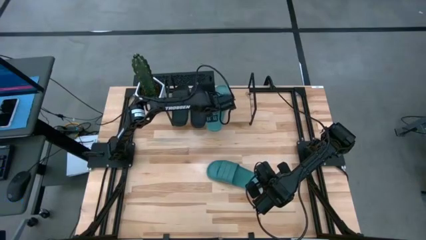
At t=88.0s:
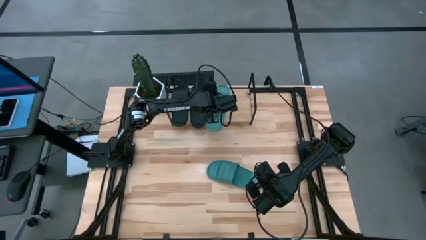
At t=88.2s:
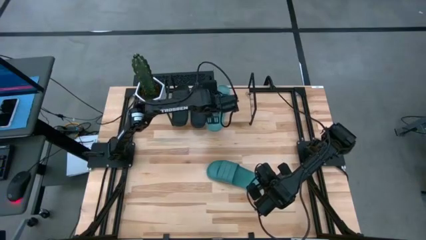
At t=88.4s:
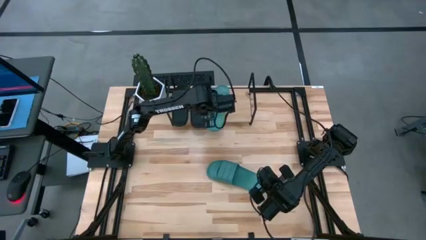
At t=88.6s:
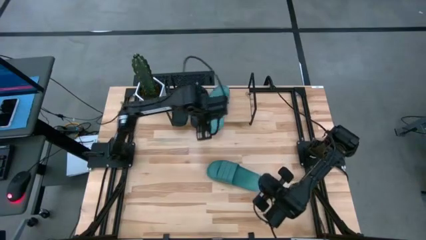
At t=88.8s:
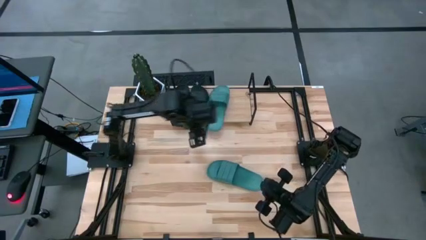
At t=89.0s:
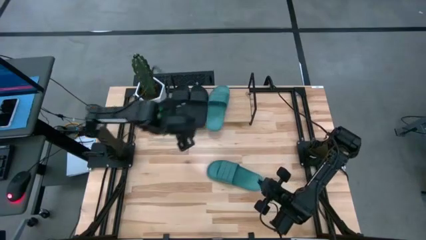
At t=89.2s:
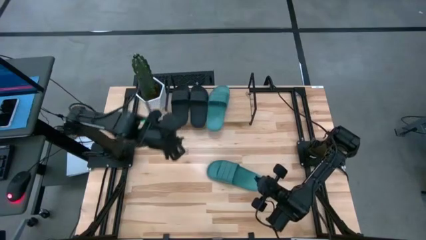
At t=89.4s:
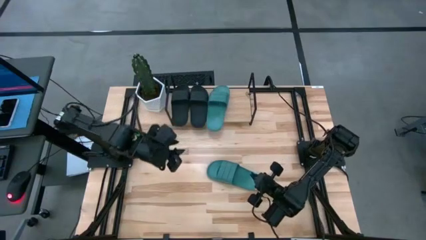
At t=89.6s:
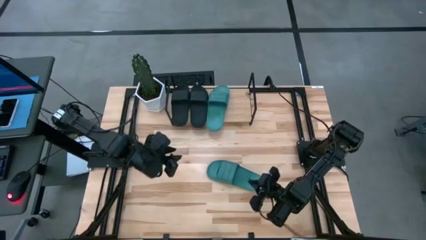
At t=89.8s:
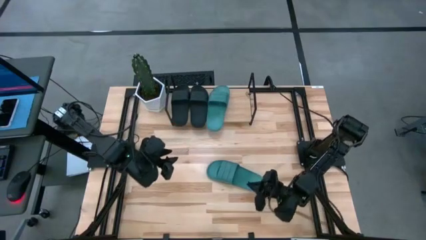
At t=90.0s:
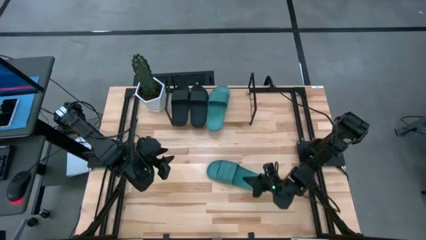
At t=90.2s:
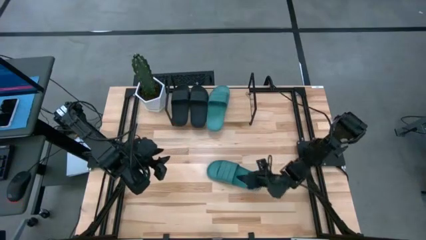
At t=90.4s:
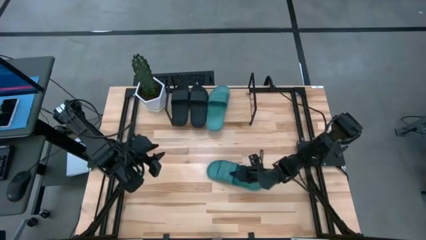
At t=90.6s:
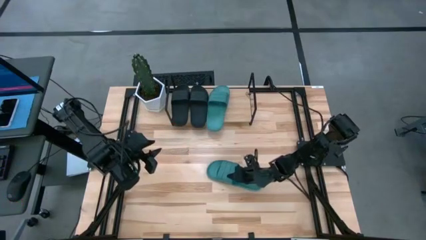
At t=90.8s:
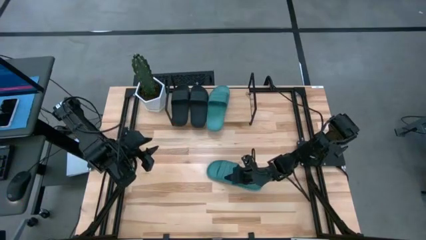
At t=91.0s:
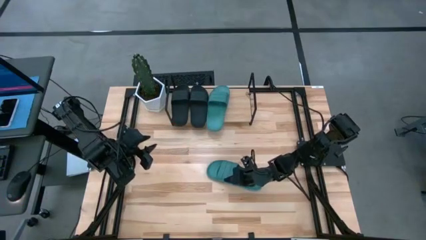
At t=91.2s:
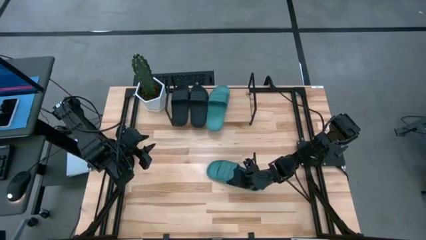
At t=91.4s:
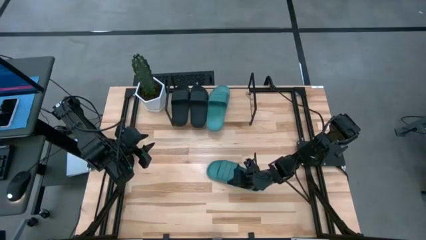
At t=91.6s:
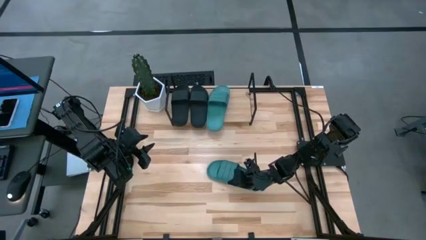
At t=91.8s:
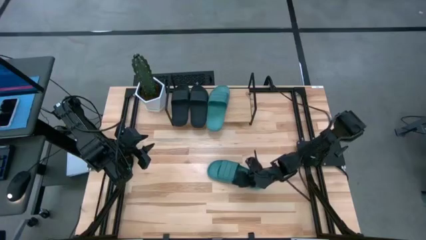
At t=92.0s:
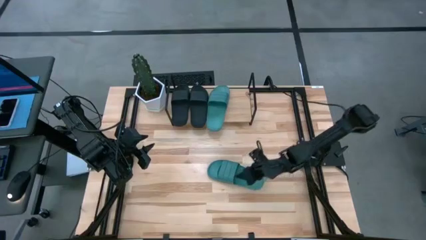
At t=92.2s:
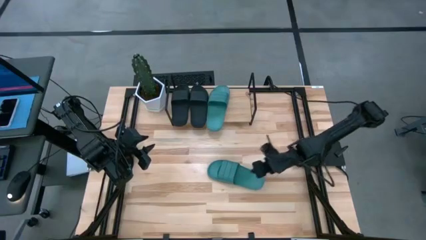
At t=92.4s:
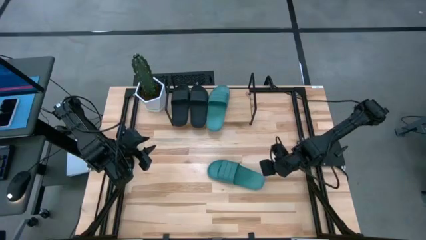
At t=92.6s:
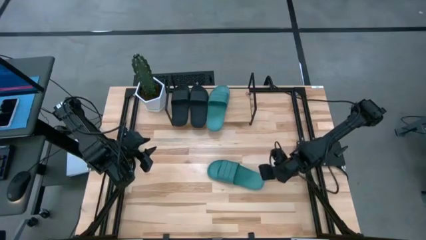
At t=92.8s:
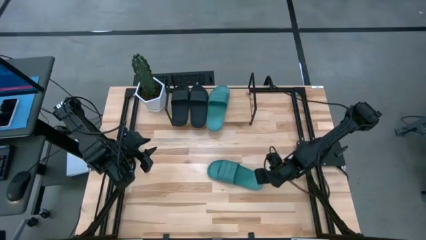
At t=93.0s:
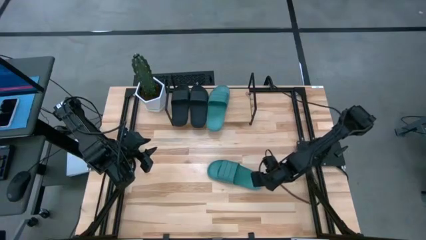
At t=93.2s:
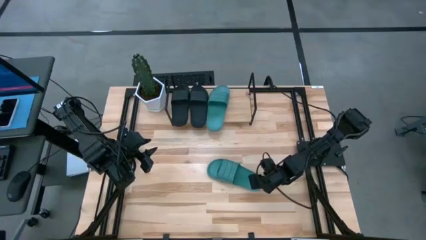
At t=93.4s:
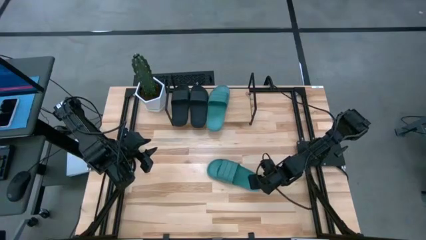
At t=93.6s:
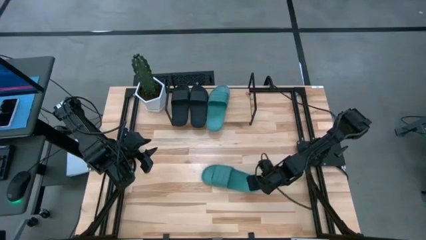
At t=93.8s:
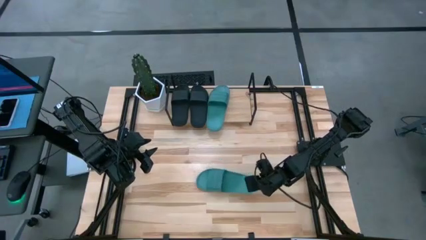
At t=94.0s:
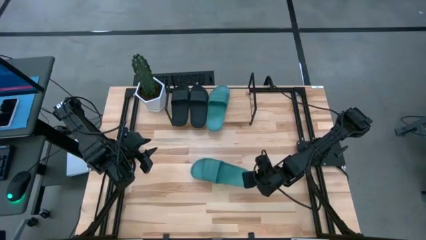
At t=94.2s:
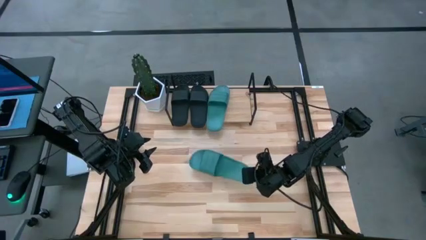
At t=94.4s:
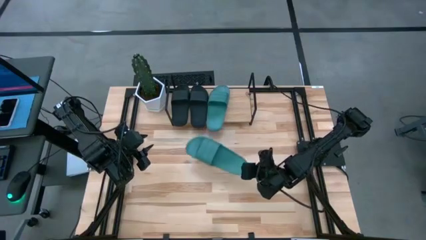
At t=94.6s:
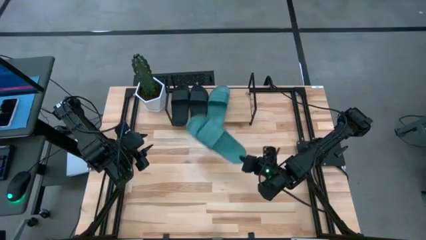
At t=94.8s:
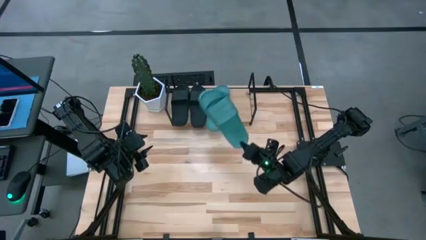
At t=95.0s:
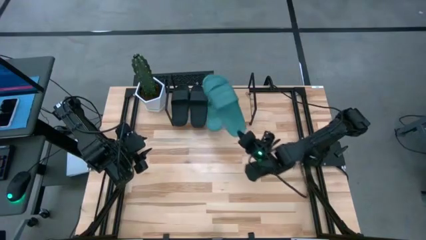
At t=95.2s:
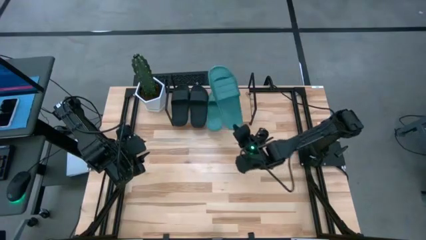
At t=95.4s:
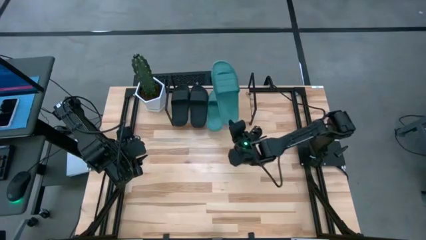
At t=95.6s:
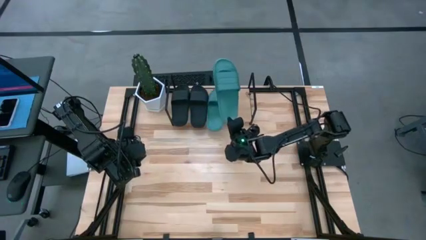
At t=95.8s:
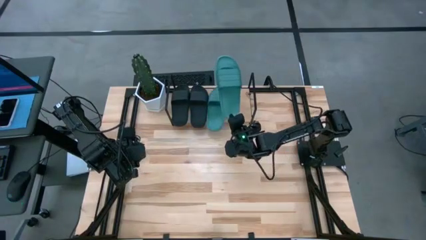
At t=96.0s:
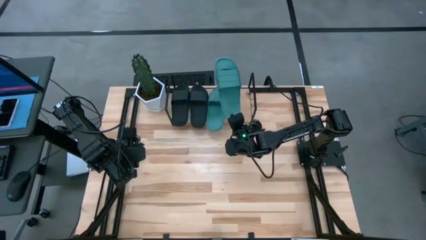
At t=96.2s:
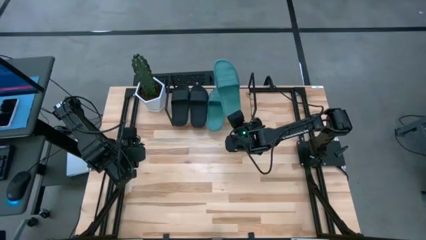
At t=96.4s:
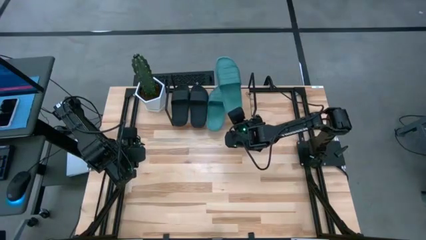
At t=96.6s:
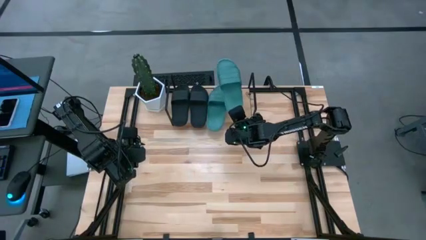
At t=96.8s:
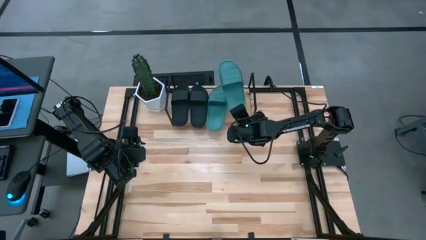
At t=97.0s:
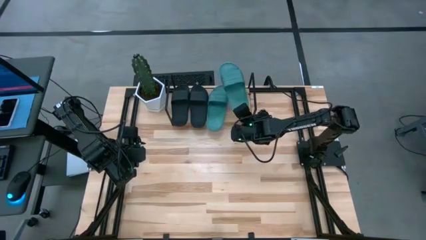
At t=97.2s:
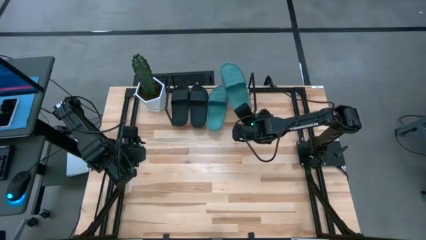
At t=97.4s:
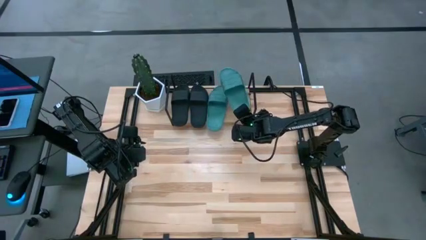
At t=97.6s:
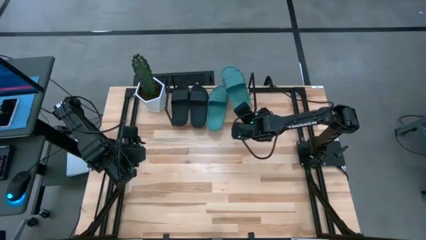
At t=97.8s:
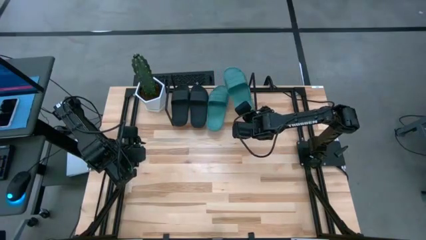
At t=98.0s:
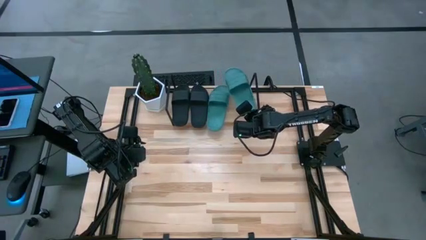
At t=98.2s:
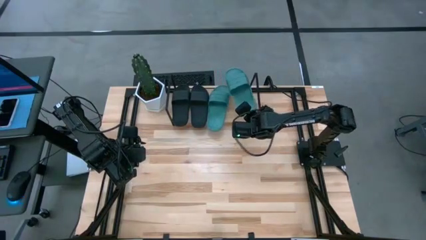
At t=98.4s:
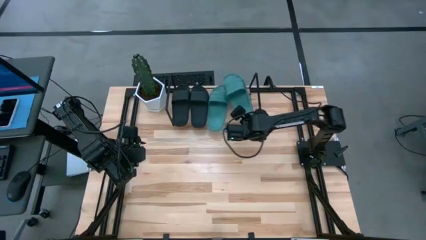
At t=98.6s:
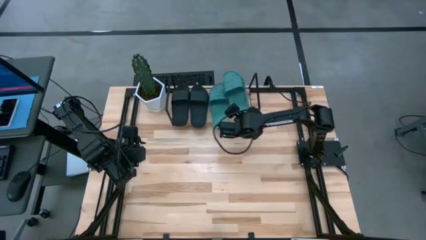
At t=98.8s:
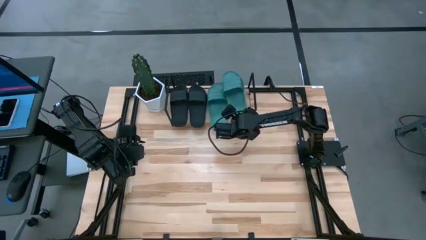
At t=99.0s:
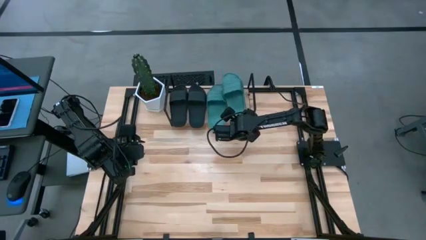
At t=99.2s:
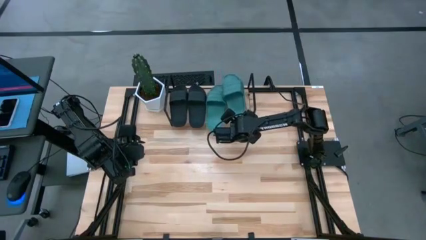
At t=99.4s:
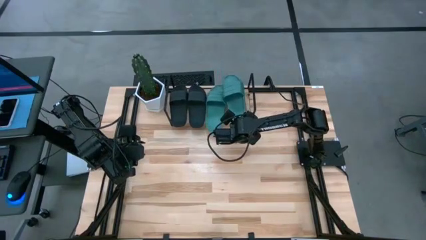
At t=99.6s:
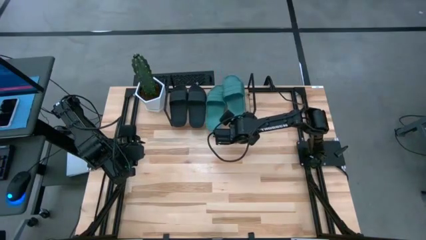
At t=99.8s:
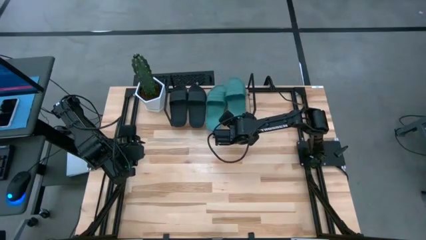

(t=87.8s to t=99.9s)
Task: Pick and place slides into the shelf
Put the green slides on the shelf
